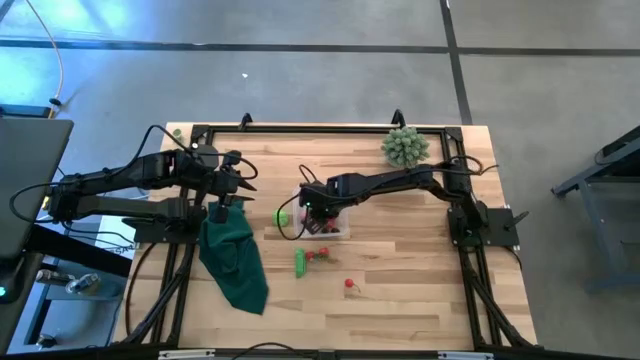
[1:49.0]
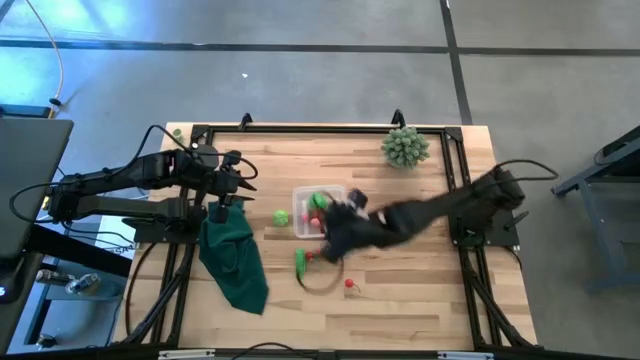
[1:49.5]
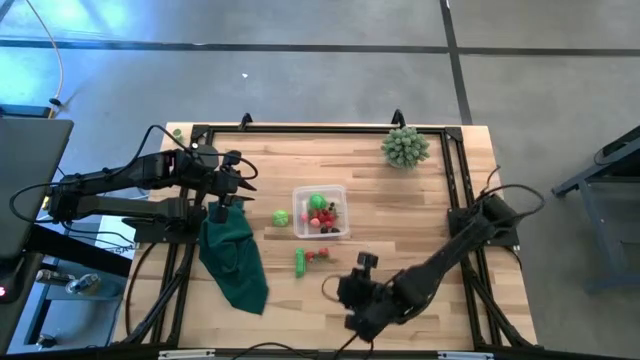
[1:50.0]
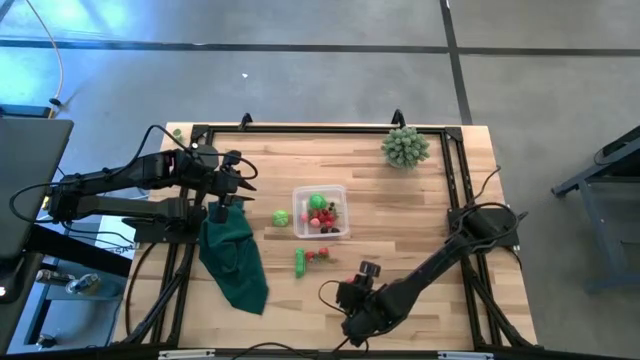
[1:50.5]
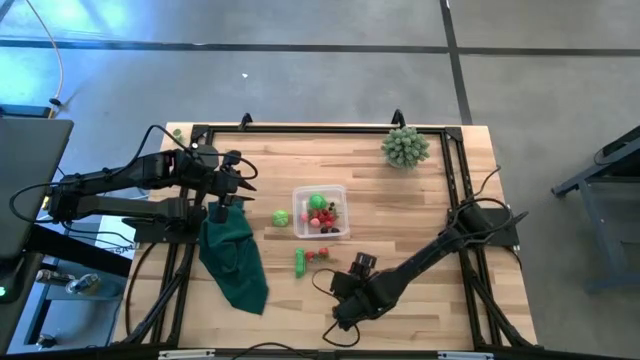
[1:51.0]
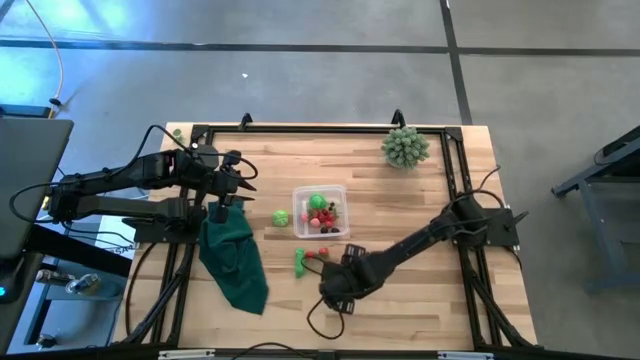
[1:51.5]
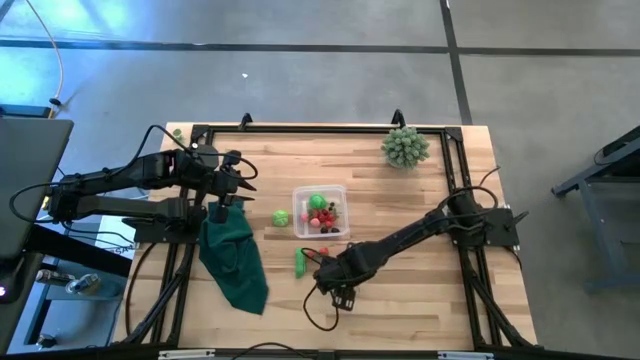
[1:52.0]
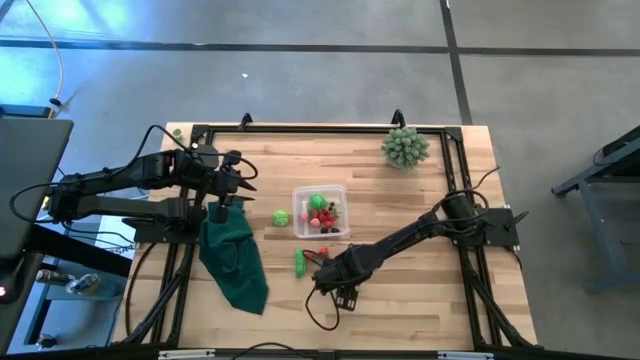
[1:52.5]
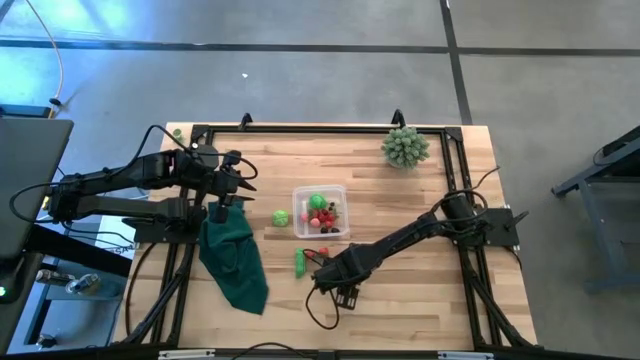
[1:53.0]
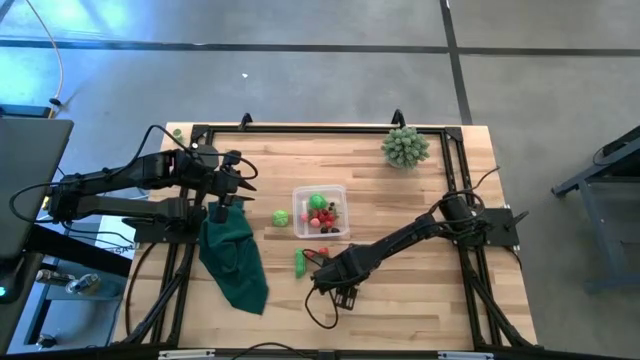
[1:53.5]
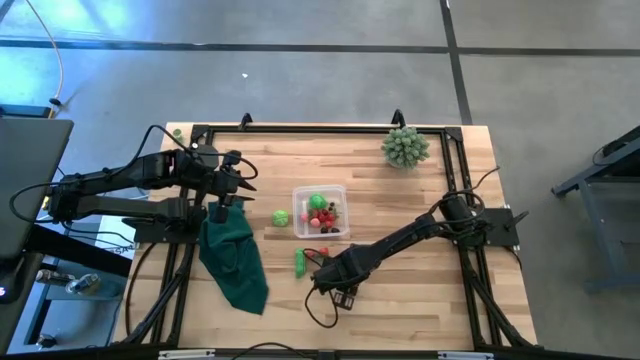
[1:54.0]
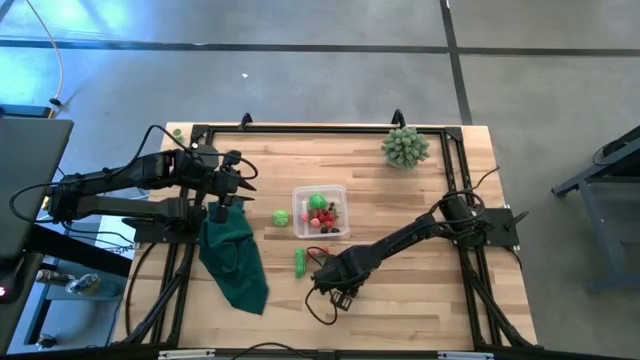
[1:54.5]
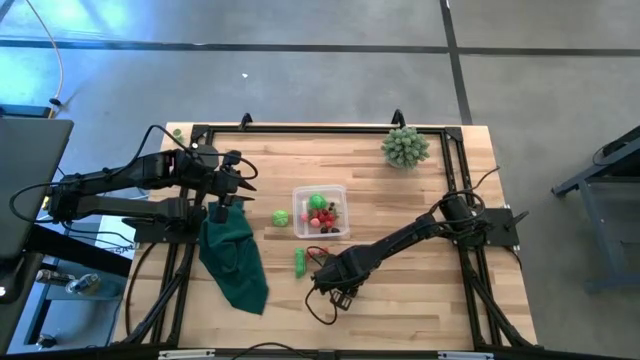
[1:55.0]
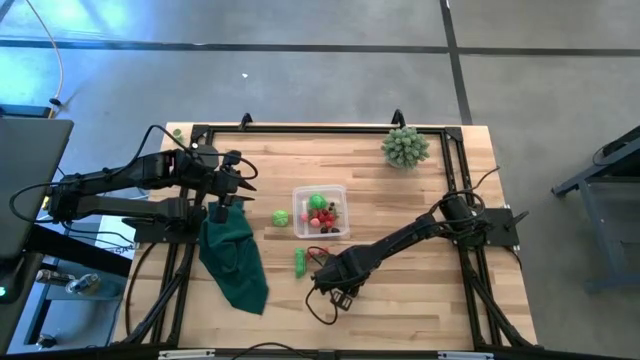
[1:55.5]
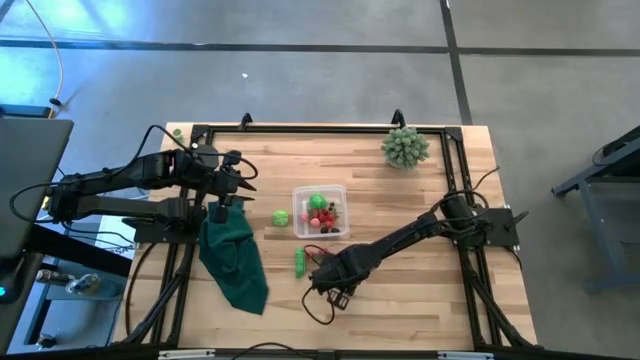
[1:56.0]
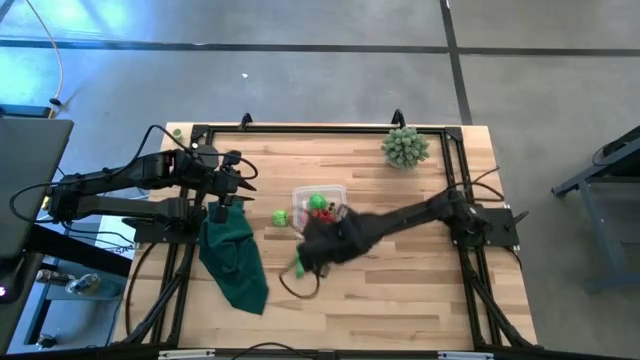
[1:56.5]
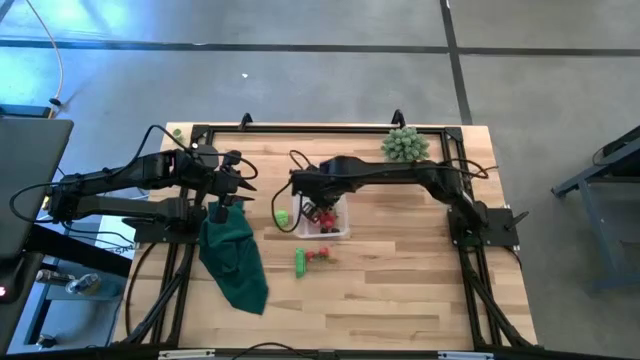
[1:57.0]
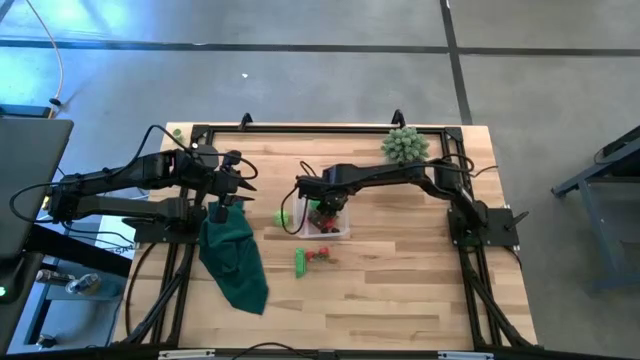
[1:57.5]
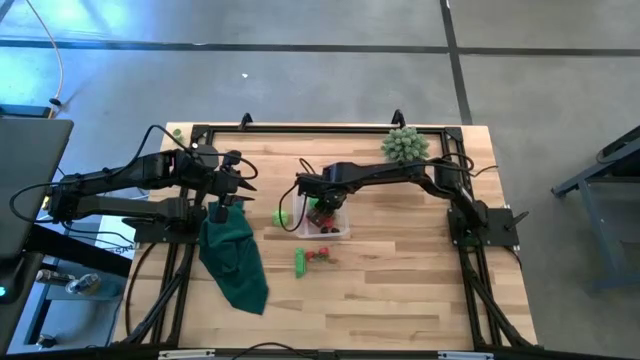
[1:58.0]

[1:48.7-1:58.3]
Task: Pick and placing Produce into tupperware
Put the red cherry into the transparent bin

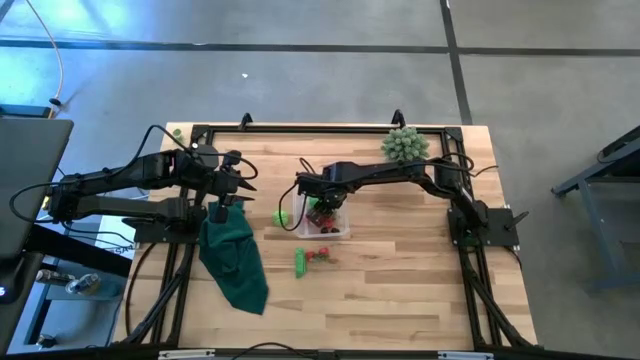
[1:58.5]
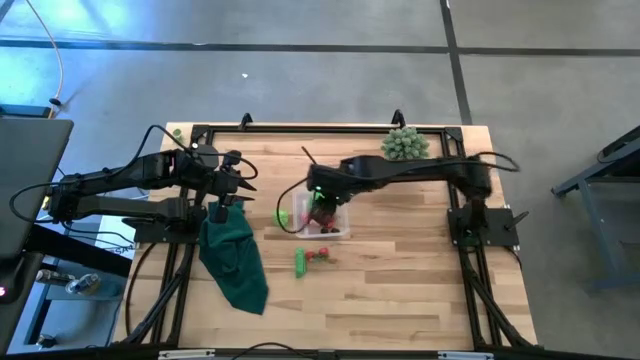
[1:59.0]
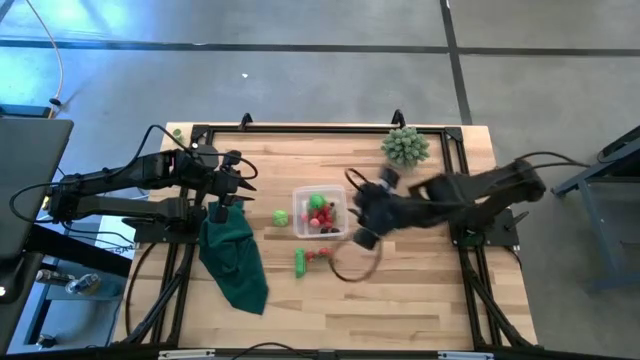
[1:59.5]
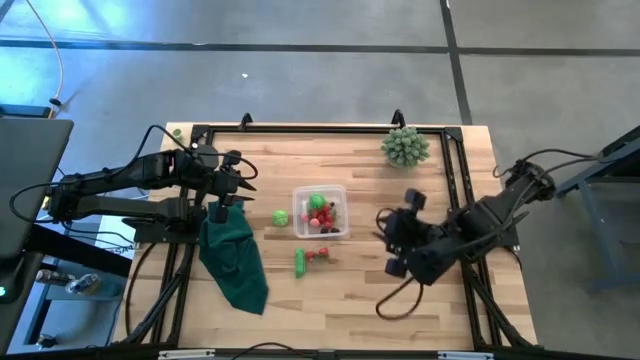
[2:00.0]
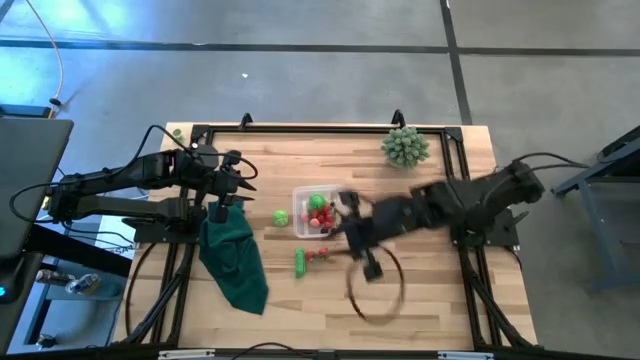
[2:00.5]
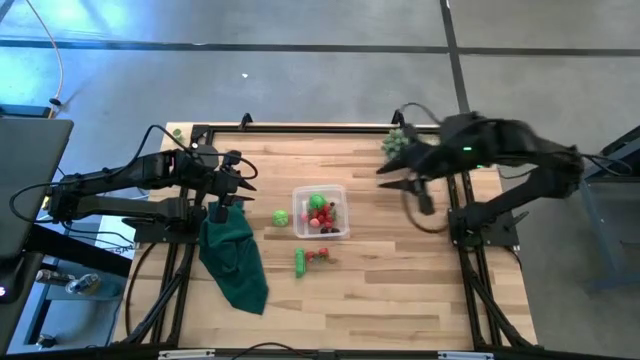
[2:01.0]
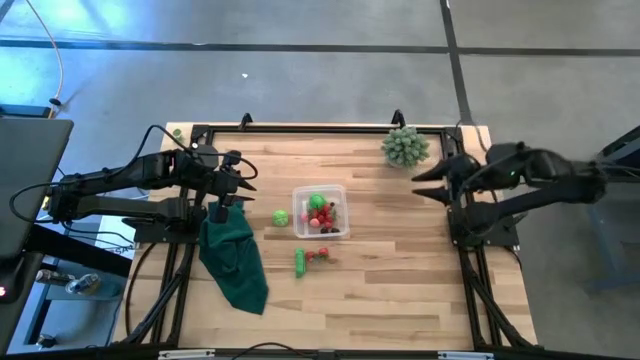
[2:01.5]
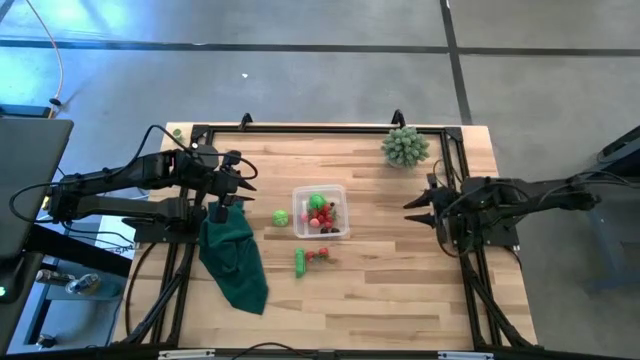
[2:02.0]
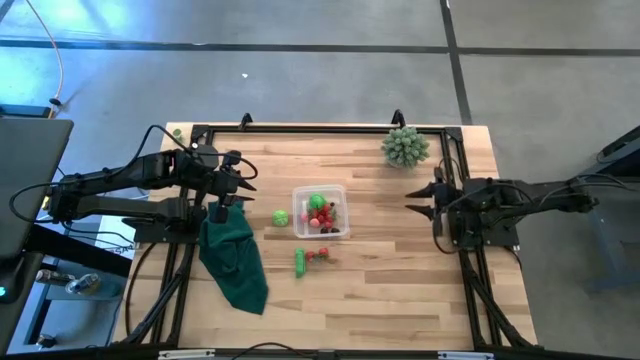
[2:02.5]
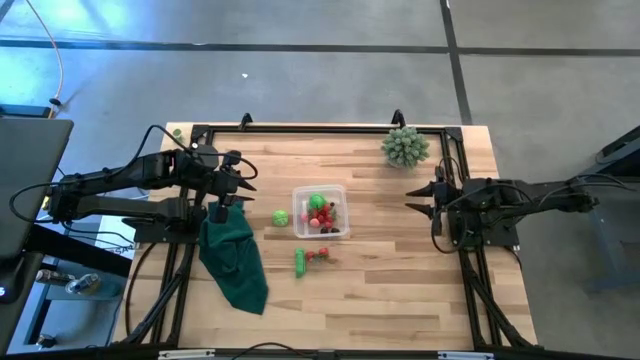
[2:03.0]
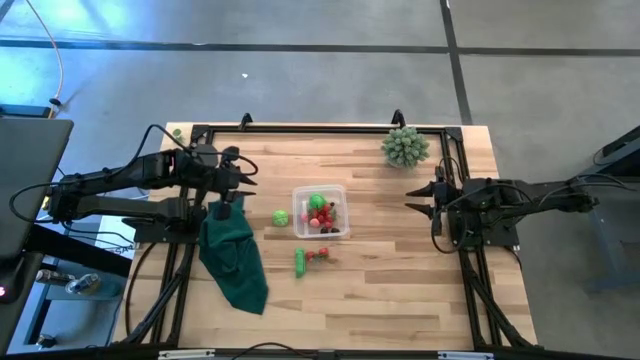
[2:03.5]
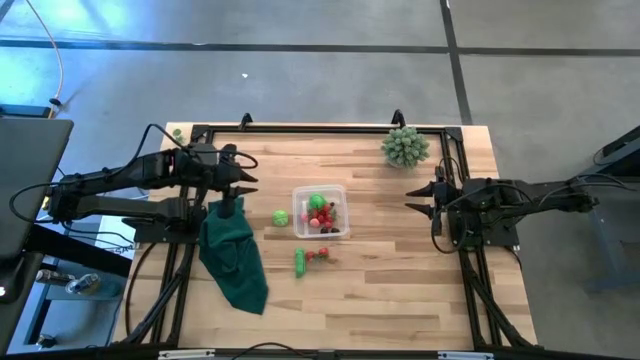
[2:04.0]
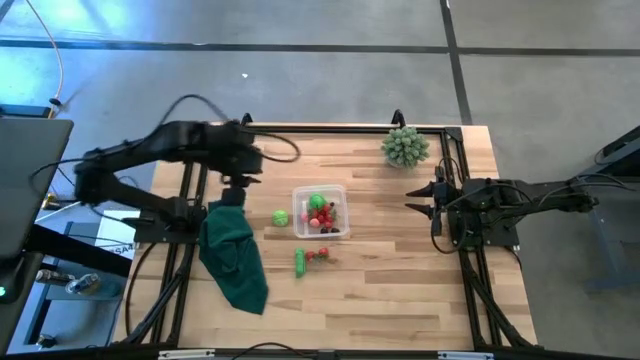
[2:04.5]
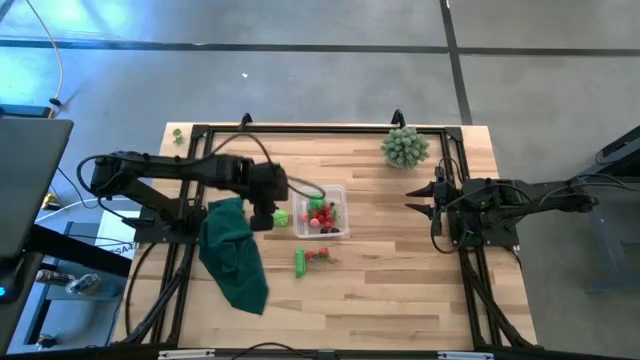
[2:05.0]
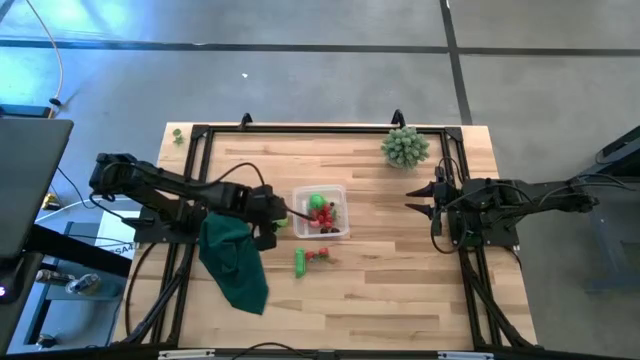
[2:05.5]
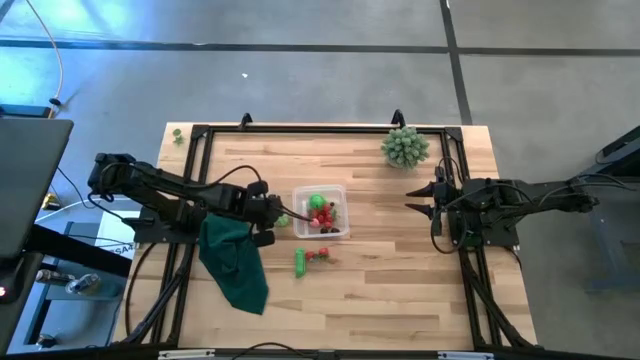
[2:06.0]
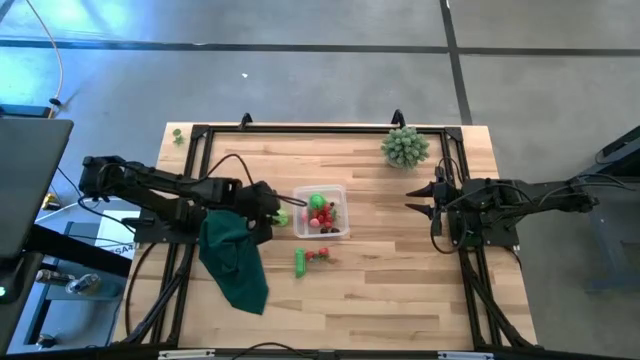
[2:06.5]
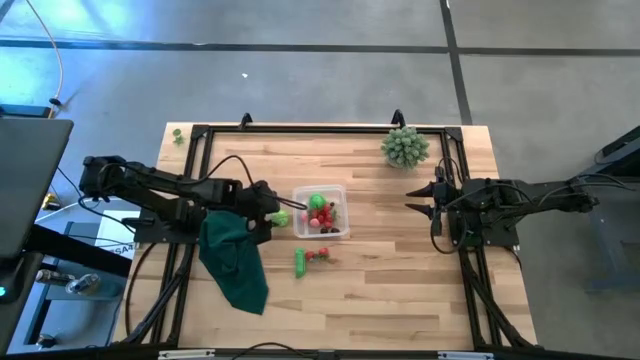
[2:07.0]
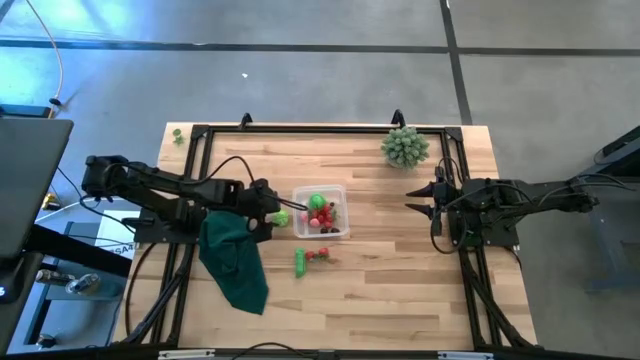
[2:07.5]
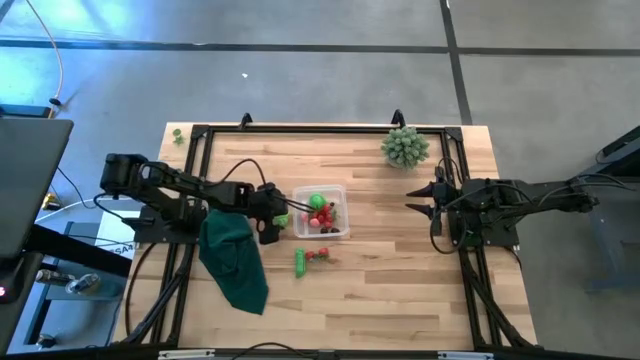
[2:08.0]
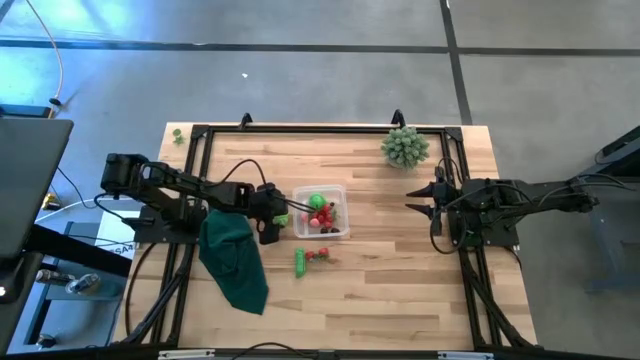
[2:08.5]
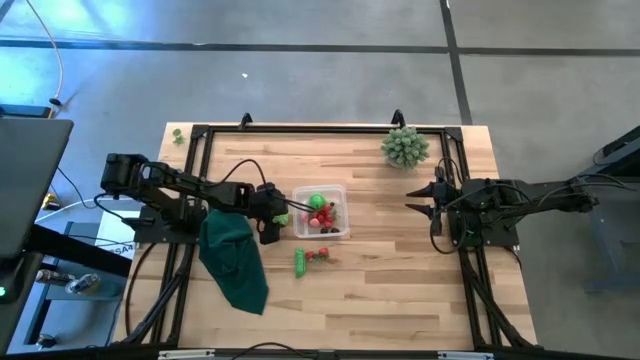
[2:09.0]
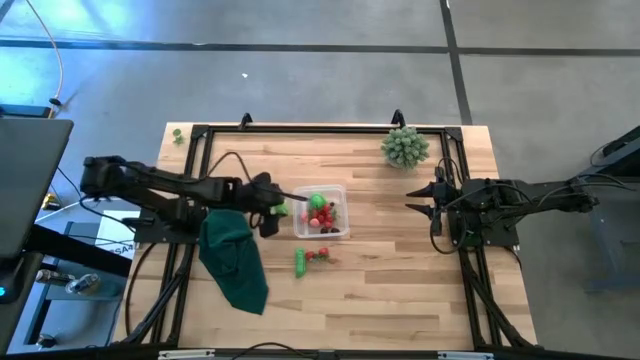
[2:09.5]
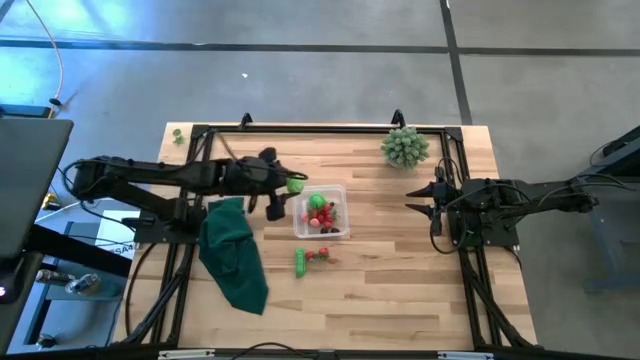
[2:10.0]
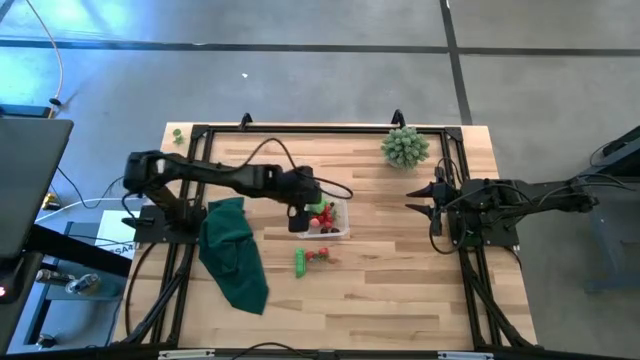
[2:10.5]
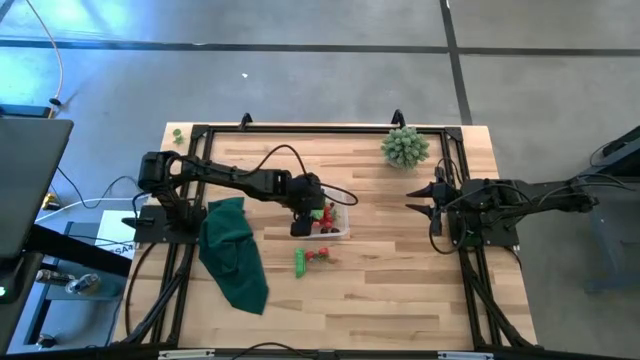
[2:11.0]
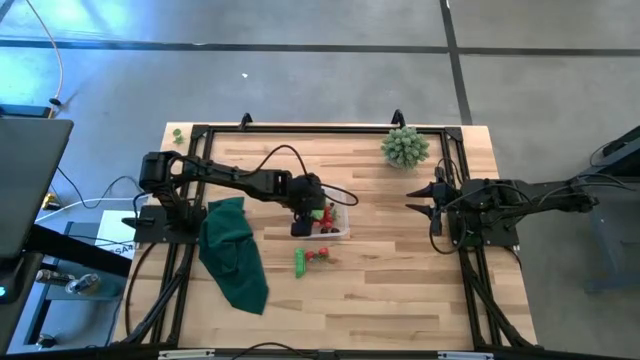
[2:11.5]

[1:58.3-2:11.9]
Put the cabbage into the transparent bin
